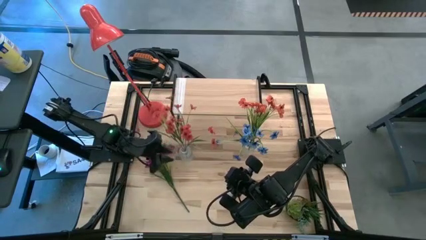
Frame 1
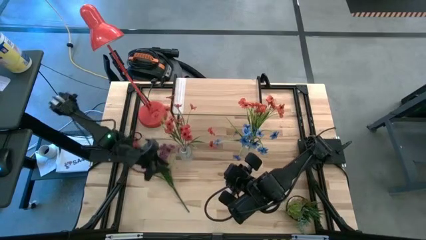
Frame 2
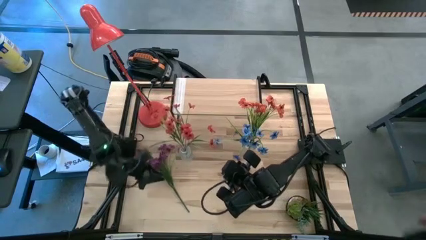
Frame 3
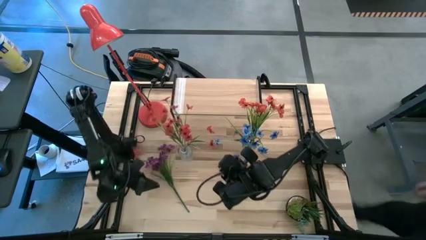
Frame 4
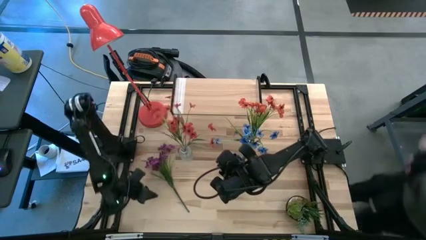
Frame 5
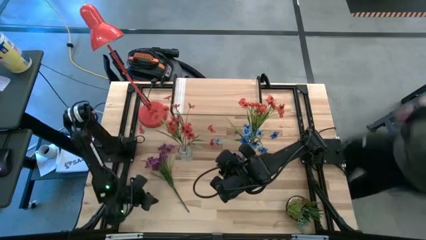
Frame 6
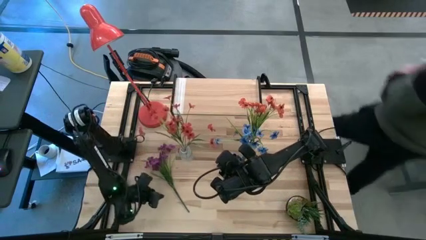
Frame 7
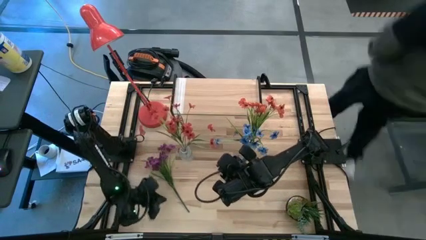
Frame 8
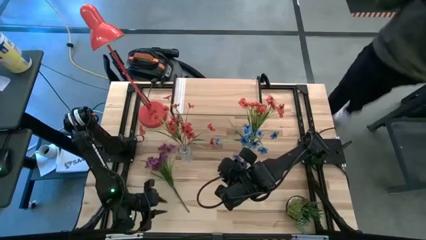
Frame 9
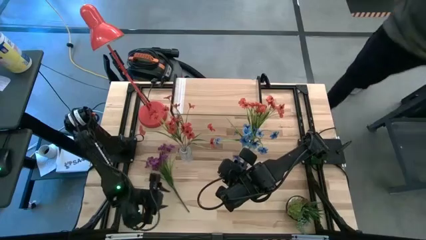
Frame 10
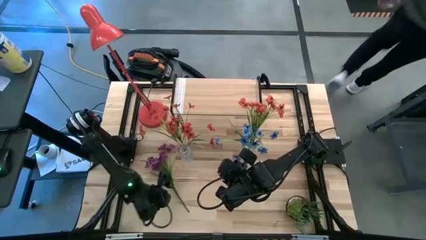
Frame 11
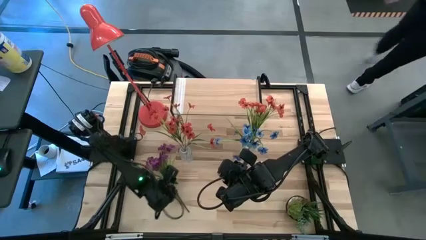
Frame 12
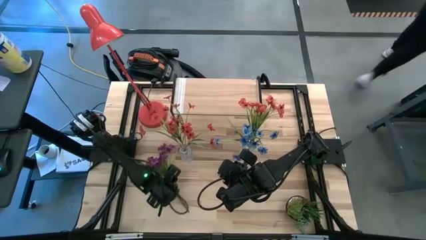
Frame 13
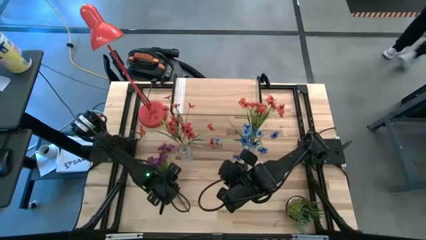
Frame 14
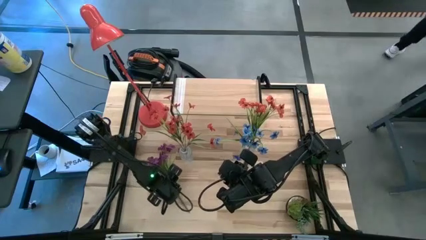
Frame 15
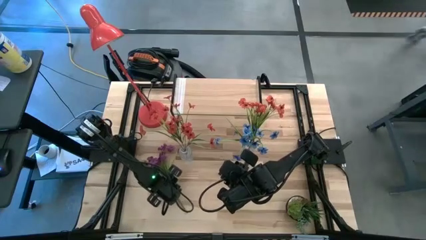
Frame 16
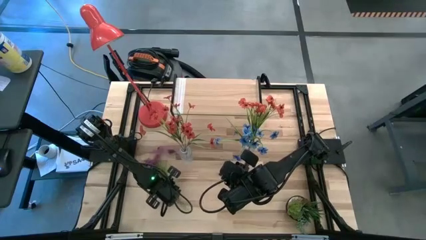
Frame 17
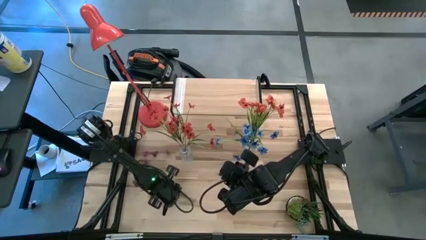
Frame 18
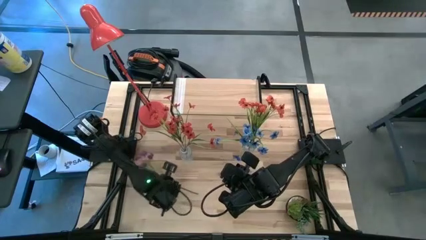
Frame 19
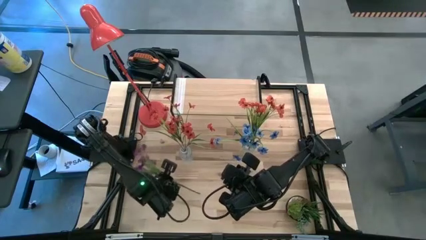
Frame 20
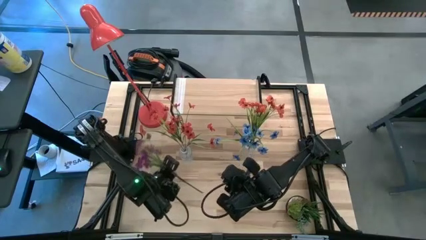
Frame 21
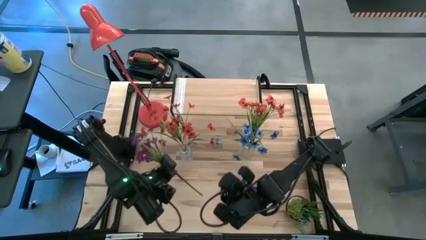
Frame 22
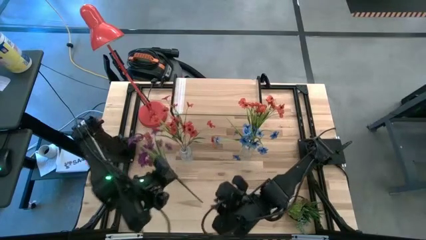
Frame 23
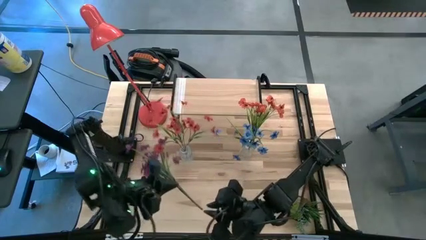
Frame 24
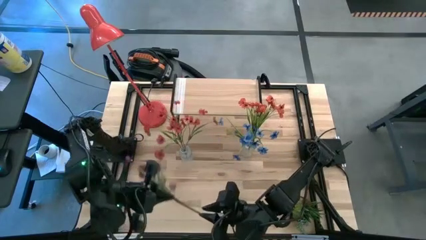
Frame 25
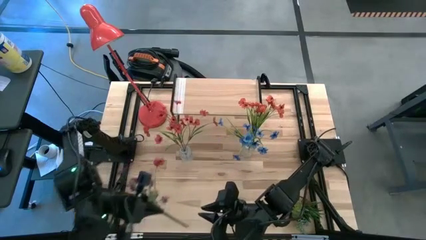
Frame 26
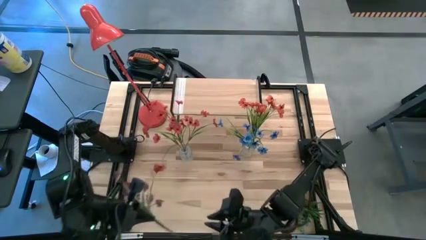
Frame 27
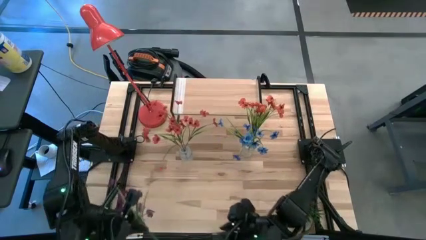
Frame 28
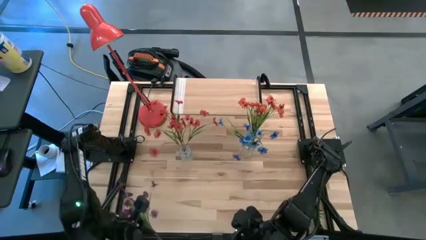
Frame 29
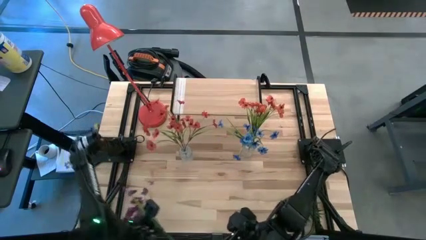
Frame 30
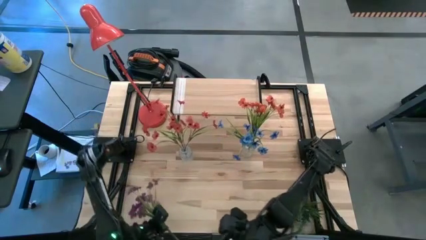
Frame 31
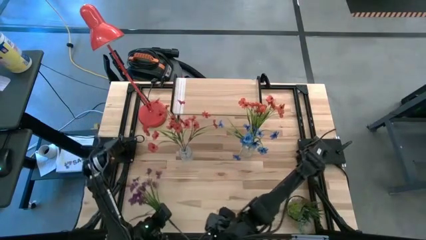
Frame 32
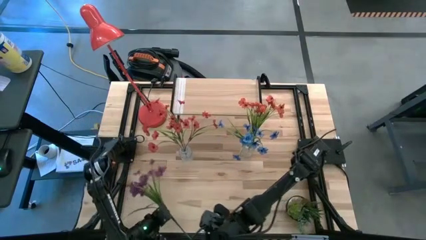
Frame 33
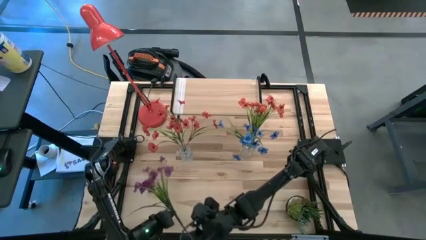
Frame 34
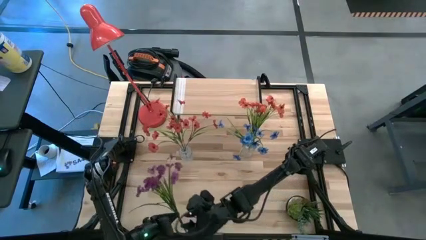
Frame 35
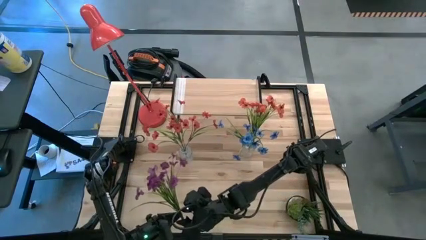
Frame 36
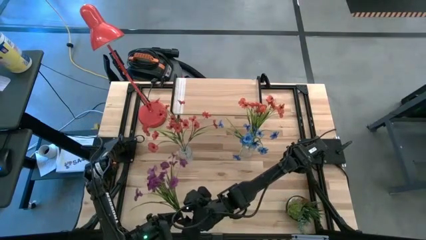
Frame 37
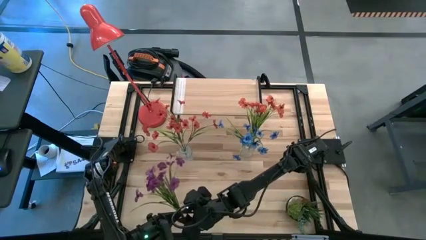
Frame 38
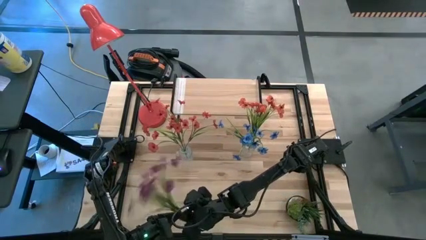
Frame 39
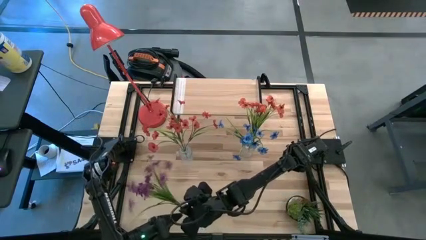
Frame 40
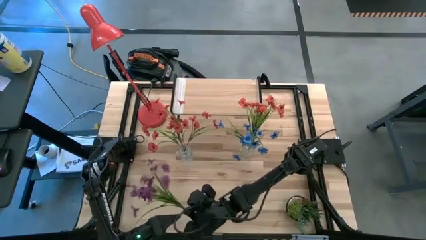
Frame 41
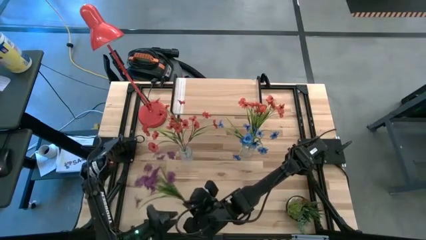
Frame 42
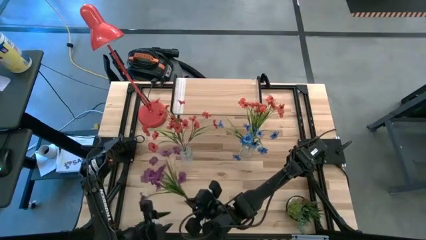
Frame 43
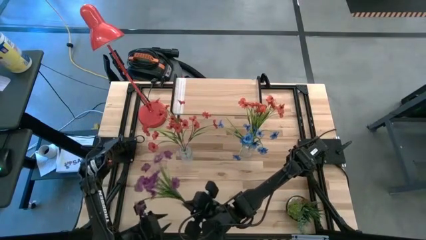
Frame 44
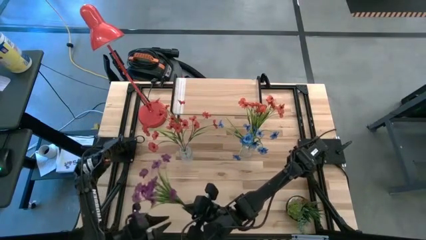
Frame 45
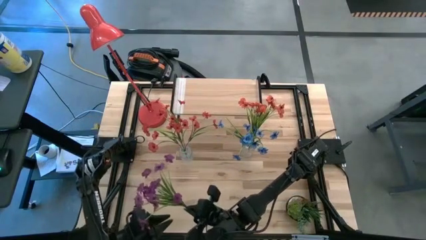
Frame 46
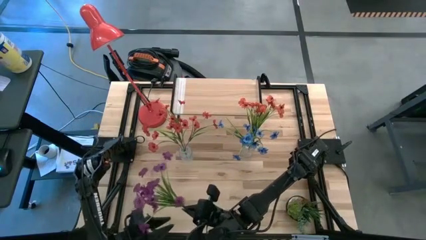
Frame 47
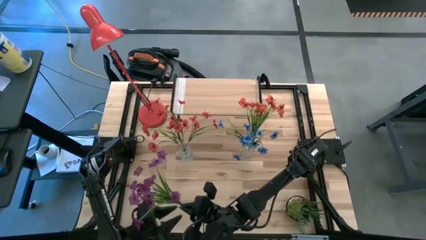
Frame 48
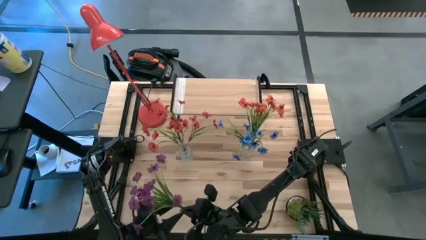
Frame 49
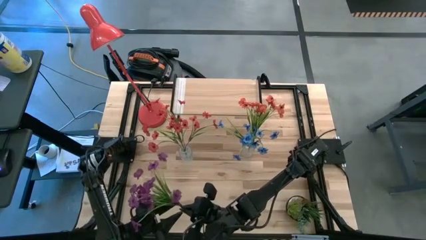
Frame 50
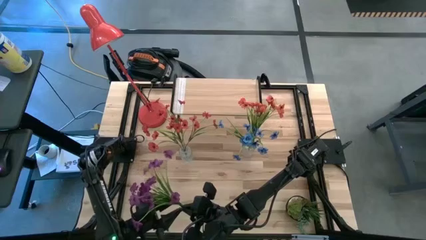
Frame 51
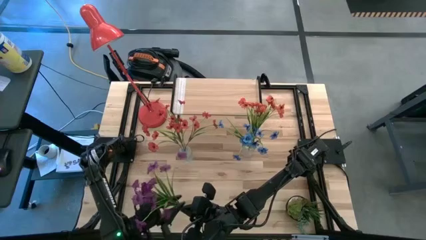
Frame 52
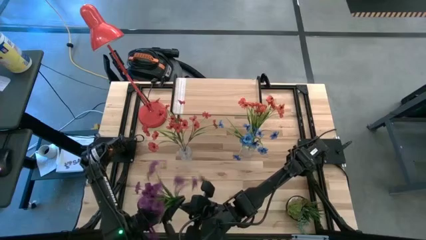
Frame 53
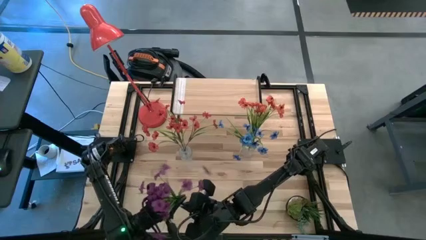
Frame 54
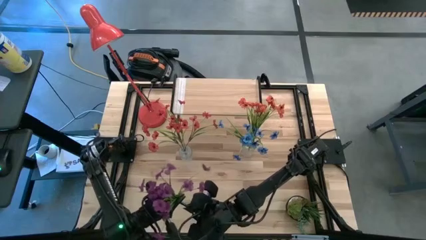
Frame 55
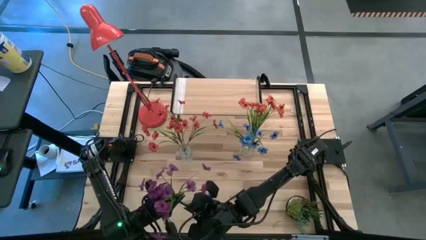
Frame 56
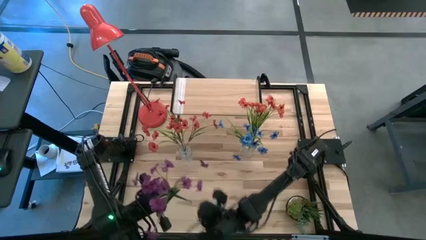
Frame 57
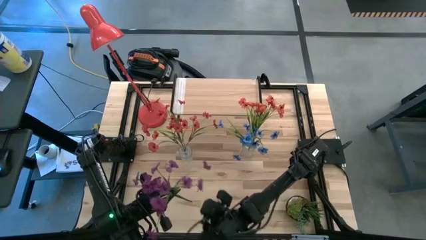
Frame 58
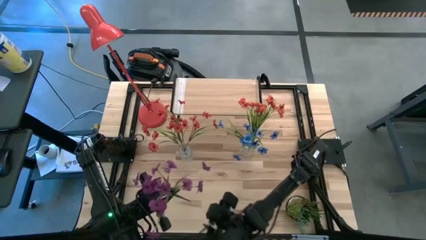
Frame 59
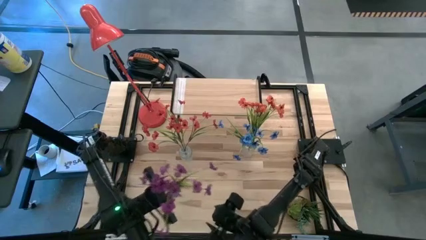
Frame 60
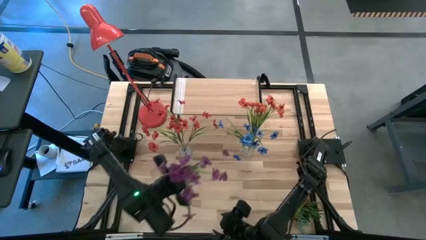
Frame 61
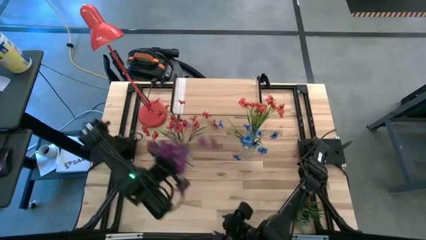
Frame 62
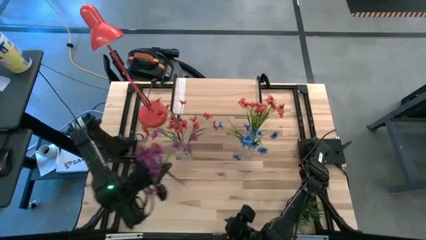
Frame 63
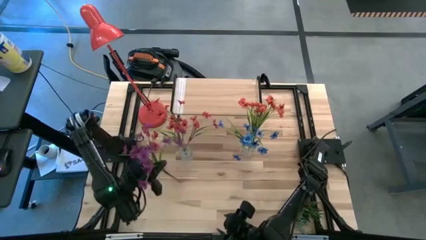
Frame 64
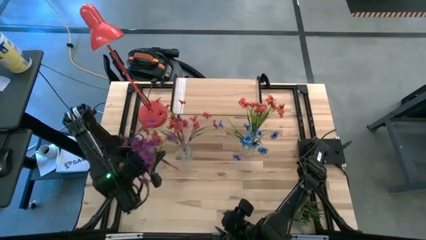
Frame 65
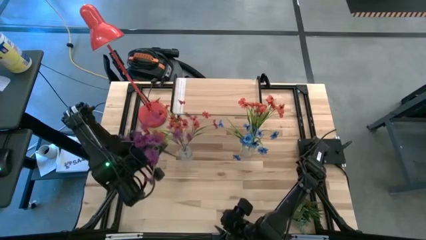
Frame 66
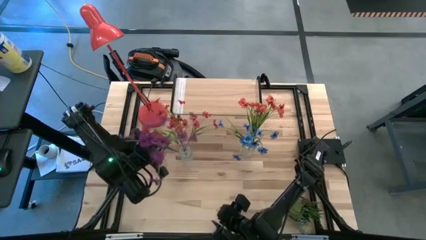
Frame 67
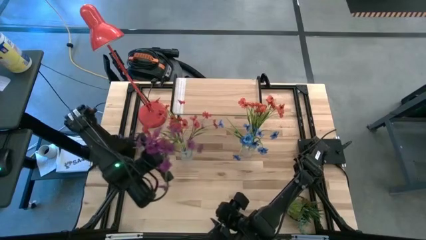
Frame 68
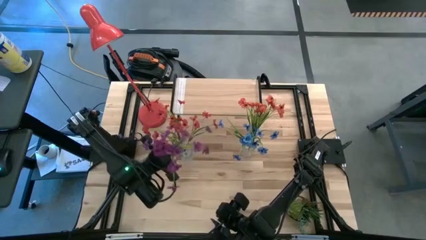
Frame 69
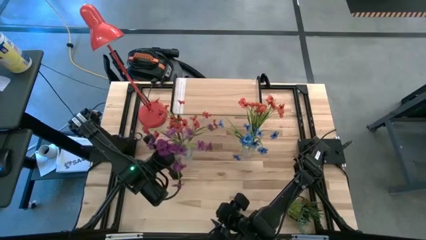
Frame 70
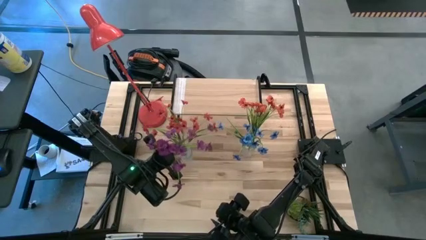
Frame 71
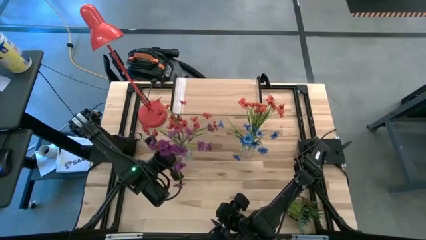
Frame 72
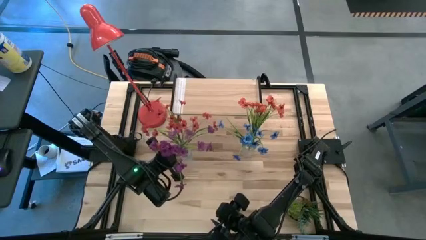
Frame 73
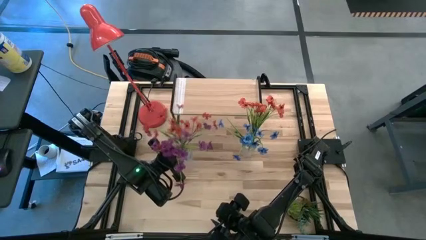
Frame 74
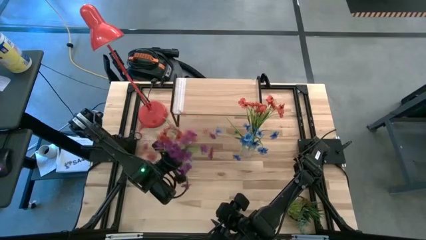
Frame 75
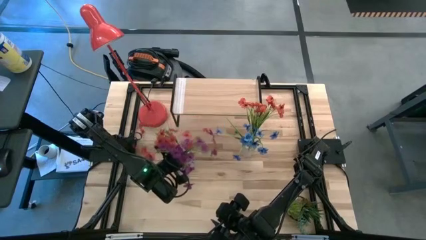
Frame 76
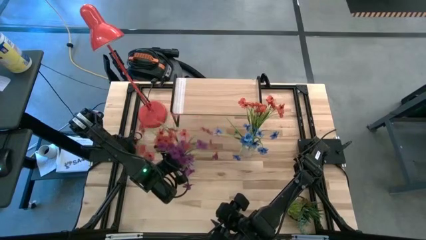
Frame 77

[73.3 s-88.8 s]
Task: Pick and place flowers into a vace then onto a shelf
Put the purple flowers into the left transparent flower vase
